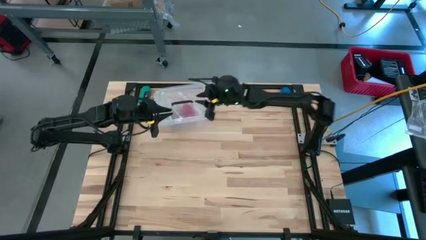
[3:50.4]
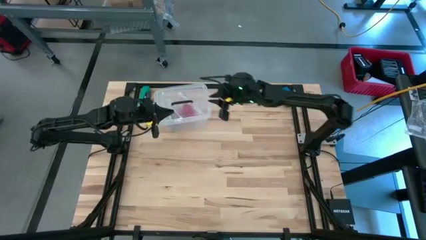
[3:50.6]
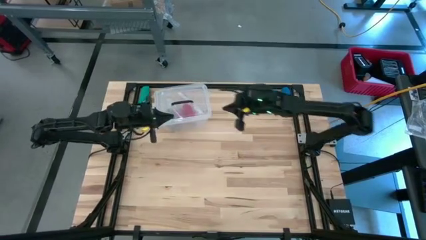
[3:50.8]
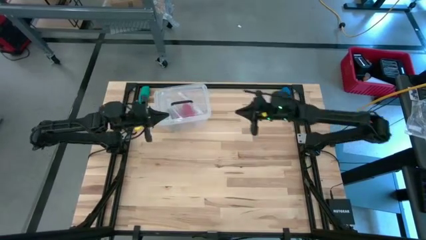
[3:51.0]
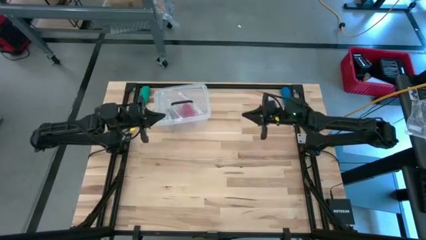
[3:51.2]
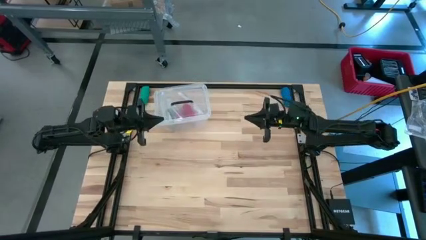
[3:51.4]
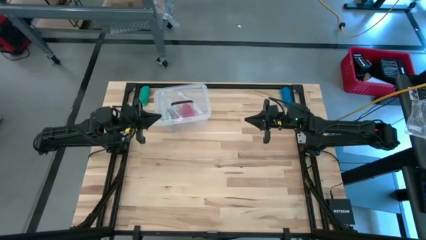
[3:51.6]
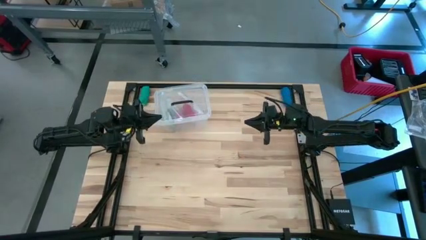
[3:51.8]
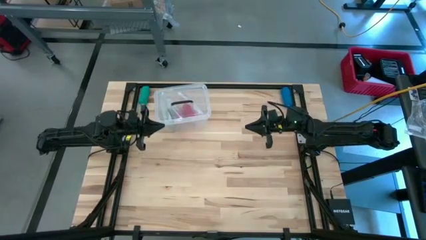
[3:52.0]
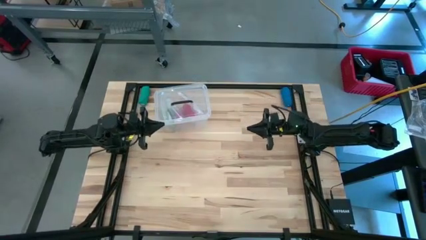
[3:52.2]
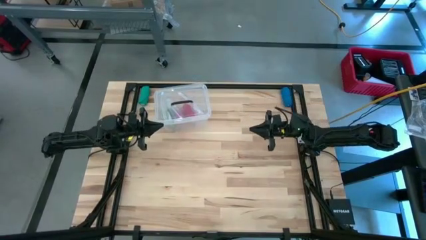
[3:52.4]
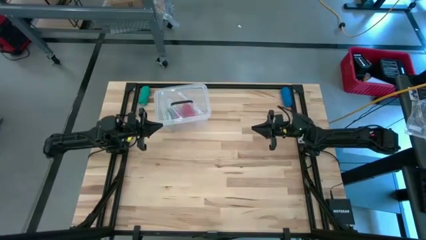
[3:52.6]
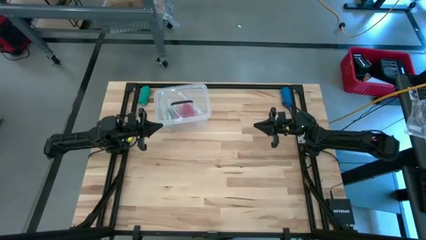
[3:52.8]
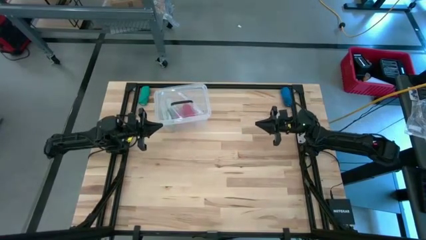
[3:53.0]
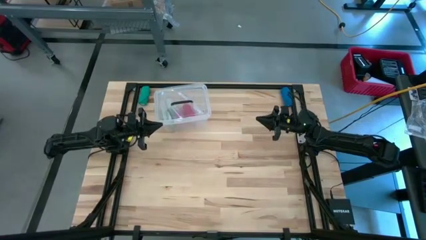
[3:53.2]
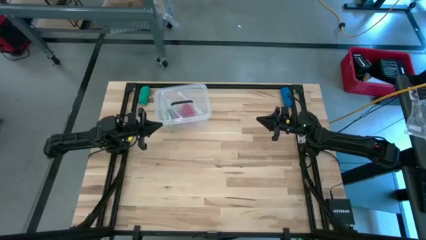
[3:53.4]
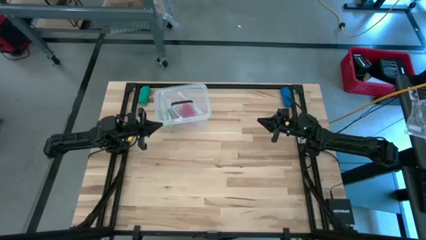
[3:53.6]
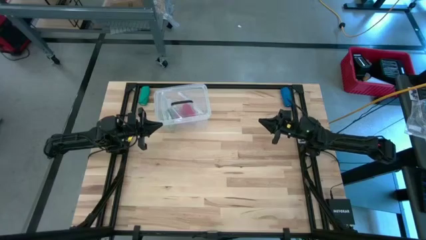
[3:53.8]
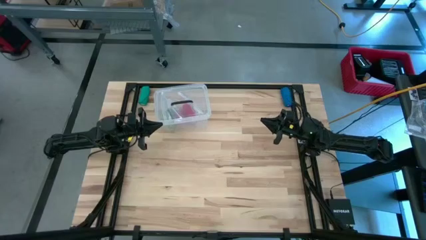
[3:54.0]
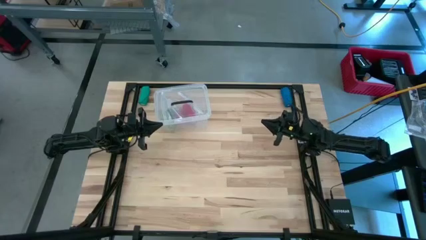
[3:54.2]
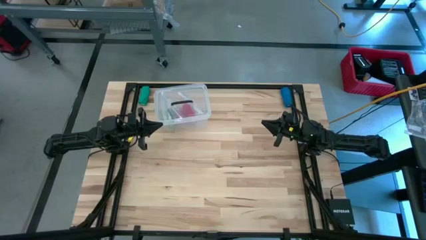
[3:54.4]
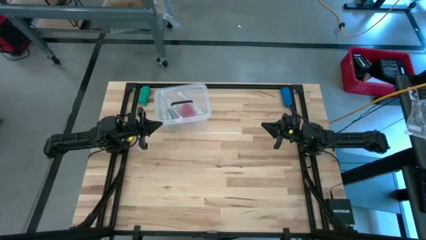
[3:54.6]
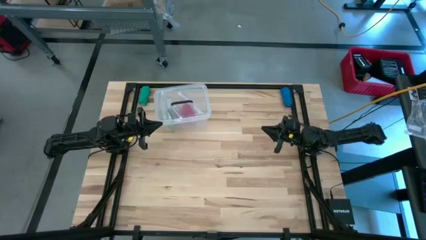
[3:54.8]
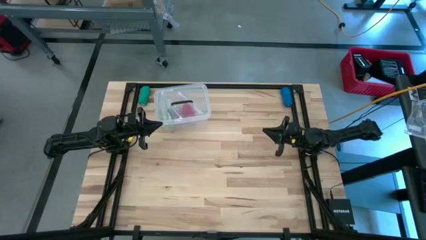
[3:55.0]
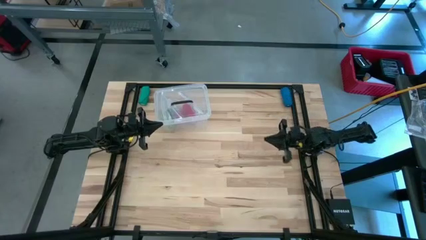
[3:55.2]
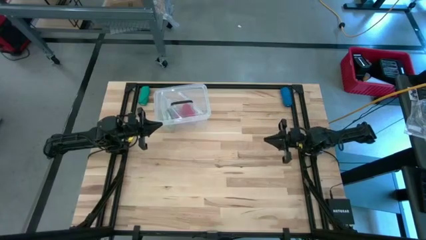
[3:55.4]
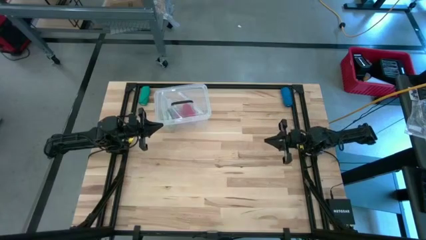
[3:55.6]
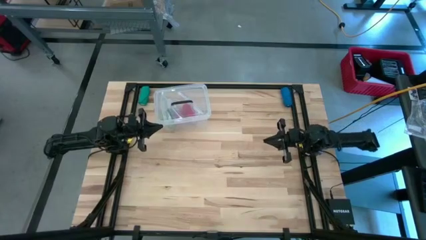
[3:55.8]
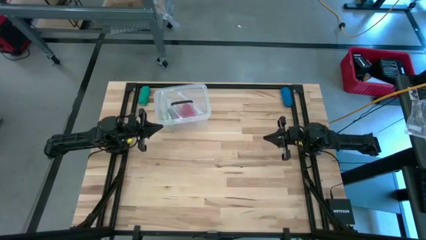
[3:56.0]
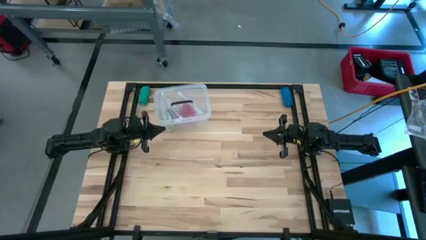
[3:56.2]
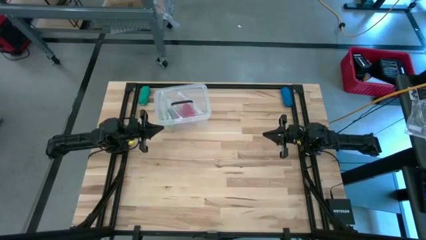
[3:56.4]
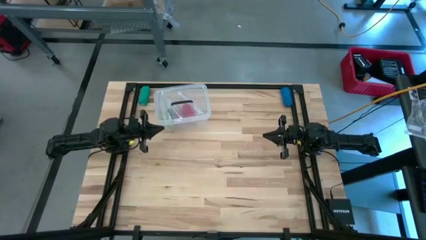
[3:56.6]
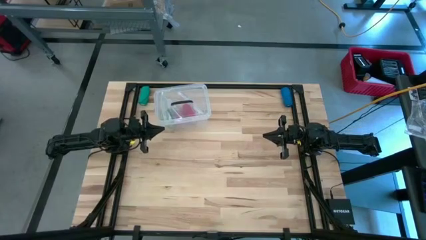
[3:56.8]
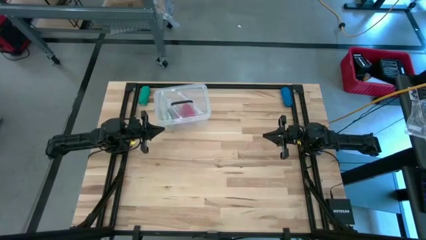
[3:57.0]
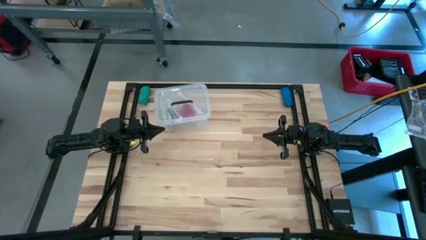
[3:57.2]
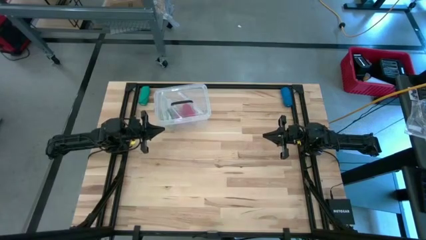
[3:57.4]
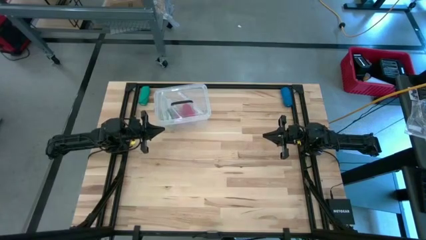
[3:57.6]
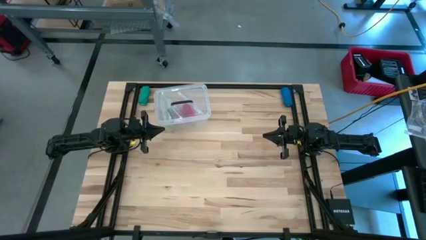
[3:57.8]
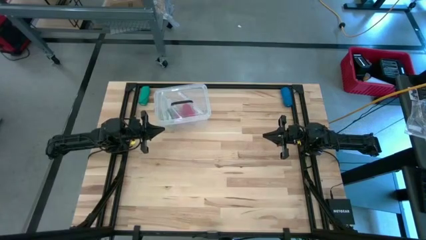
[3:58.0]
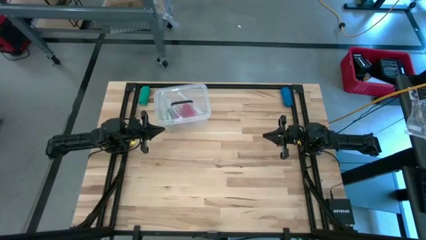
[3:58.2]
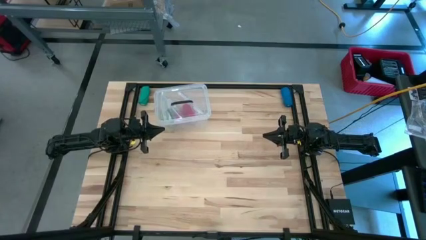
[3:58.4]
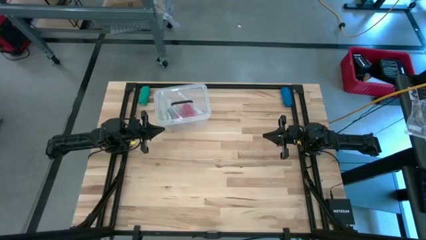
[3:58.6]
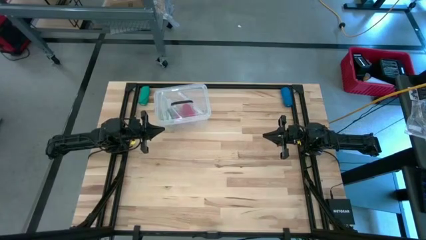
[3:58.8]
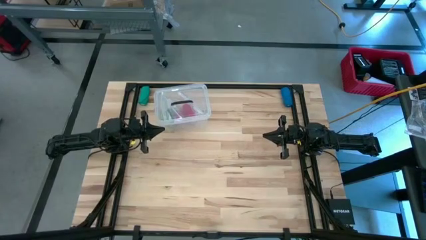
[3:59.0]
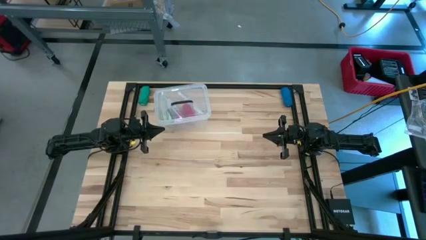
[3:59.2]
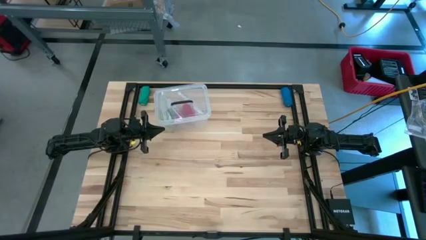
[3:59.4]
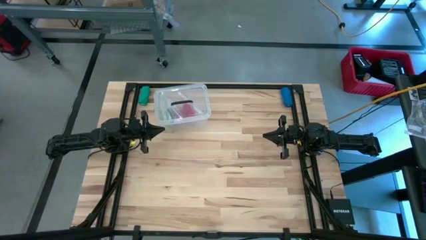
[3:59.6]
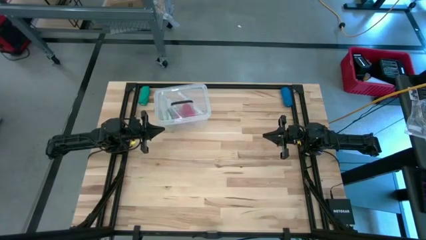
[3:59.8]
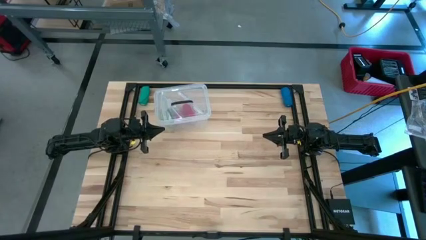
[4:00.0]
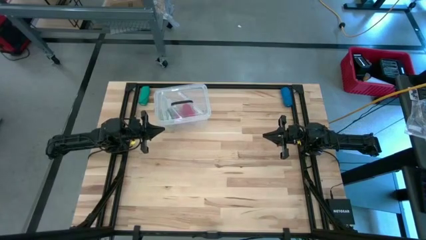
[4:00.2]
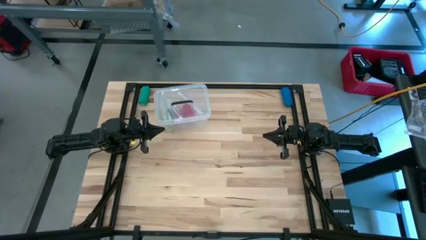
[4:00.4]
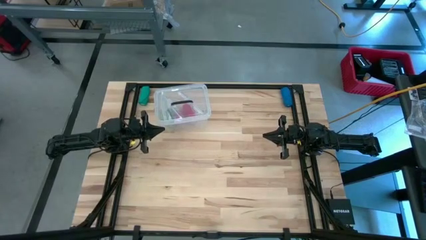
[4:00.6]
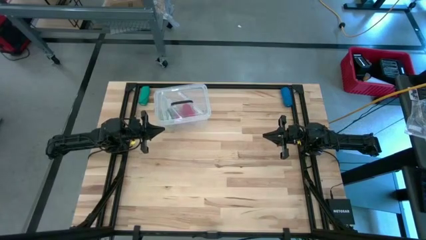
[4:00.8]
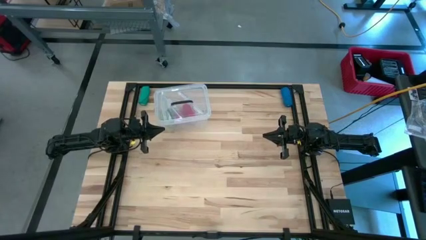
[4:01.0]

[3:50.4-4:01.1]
Task: Roll bandage
Return to Home Position
